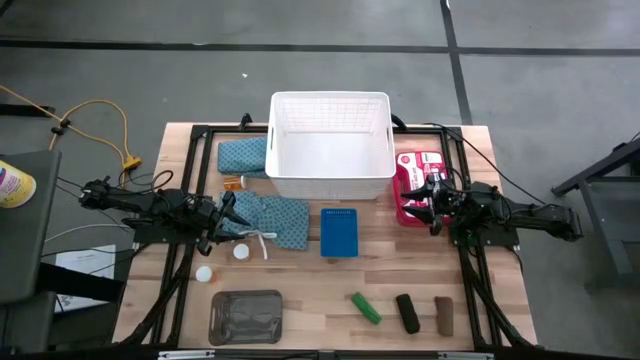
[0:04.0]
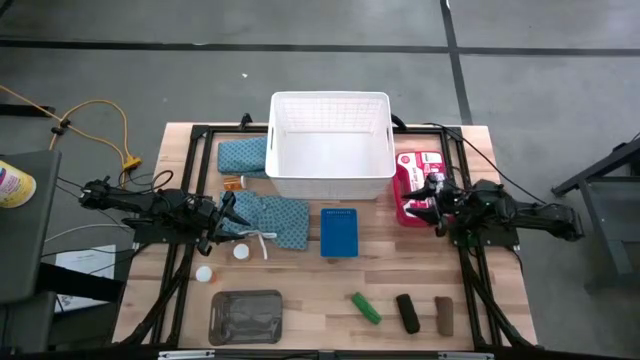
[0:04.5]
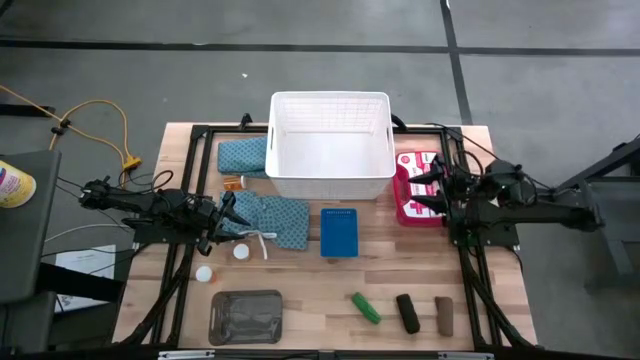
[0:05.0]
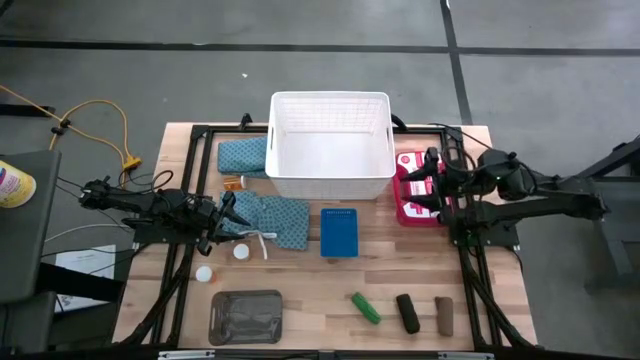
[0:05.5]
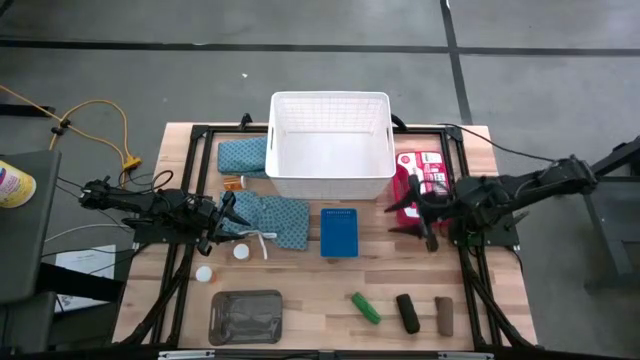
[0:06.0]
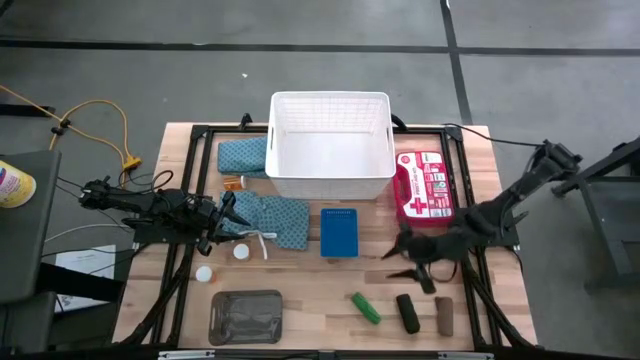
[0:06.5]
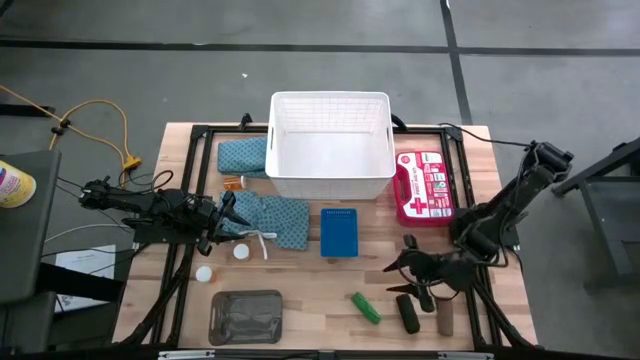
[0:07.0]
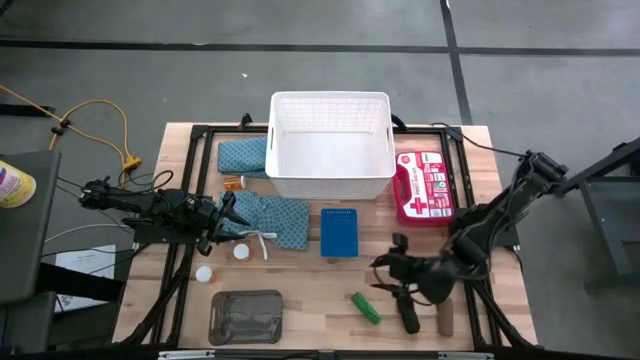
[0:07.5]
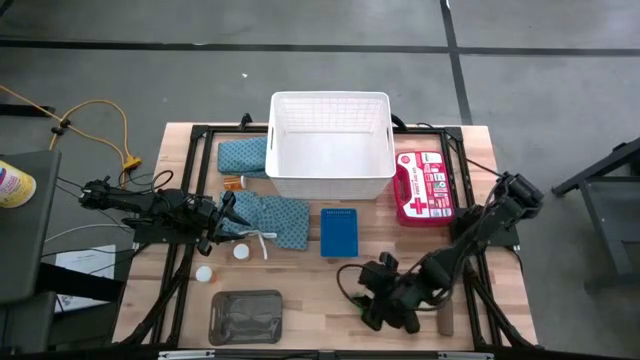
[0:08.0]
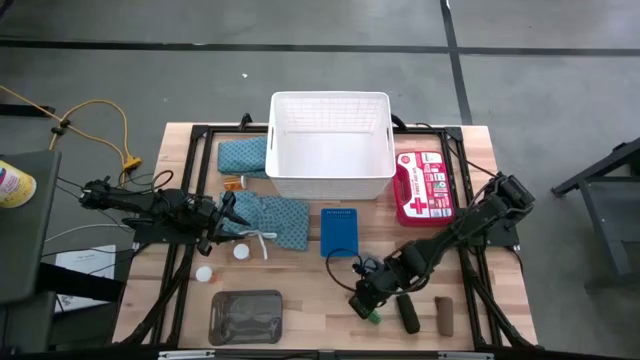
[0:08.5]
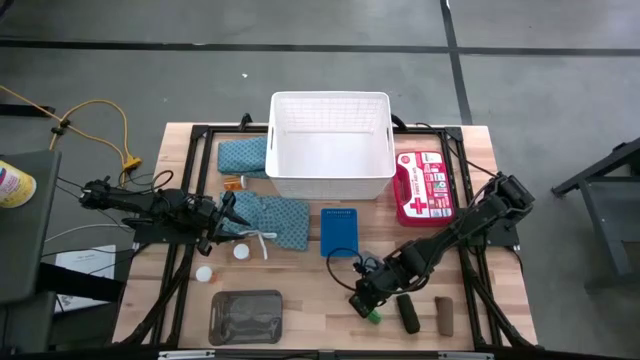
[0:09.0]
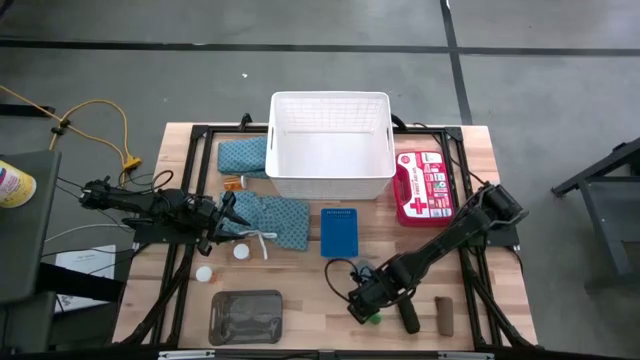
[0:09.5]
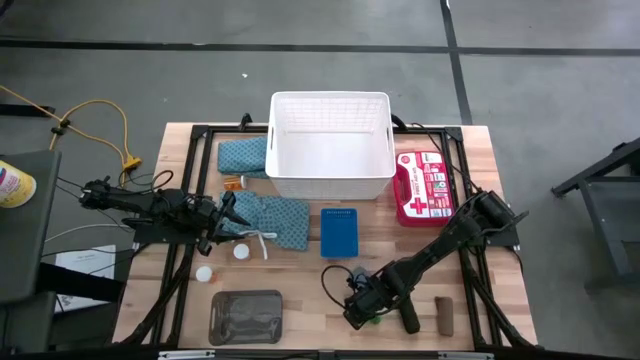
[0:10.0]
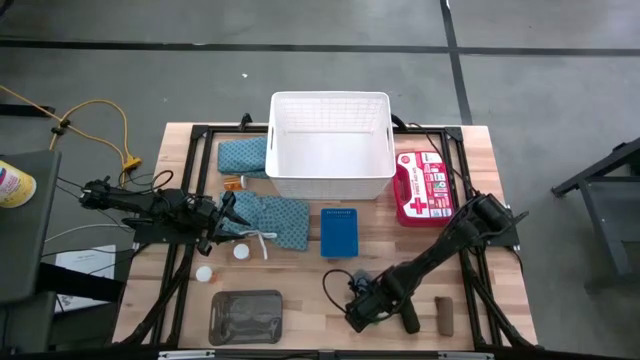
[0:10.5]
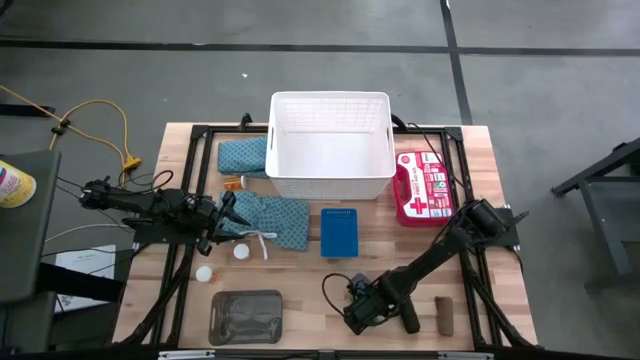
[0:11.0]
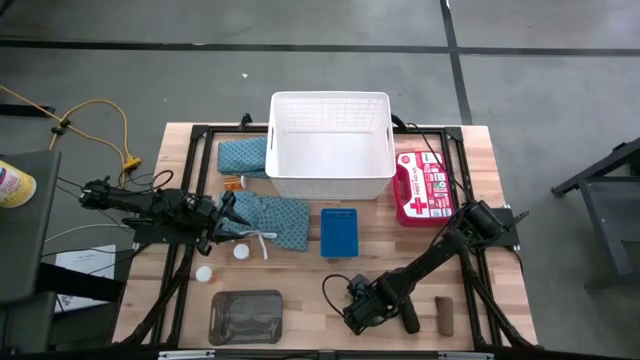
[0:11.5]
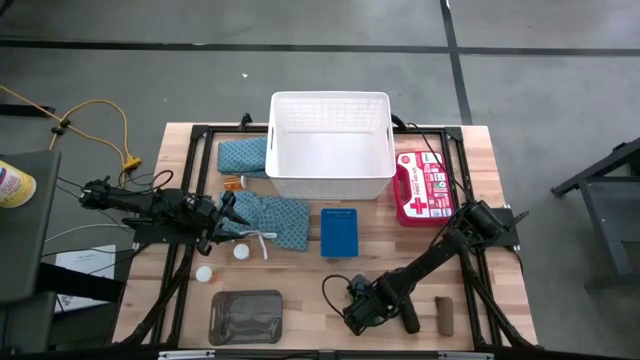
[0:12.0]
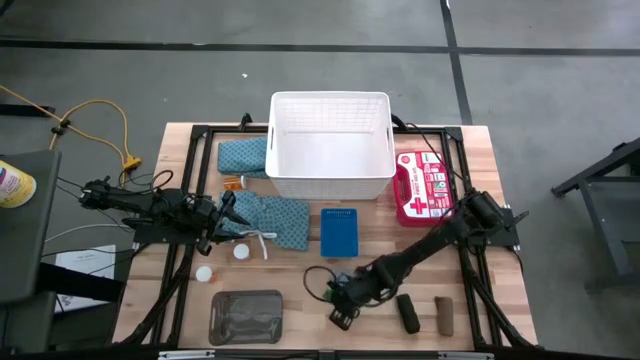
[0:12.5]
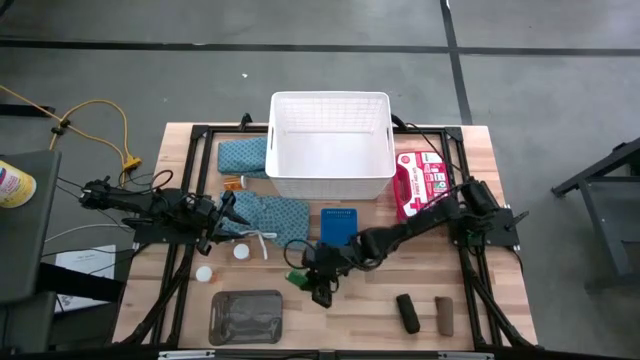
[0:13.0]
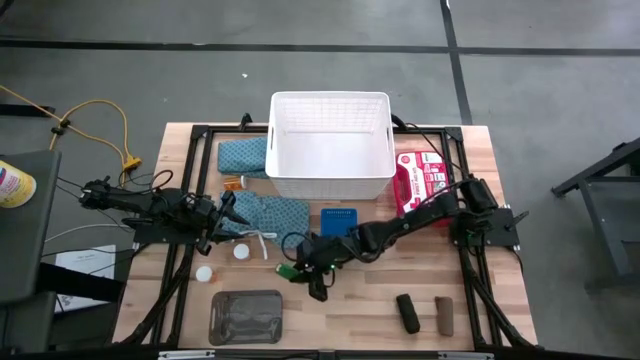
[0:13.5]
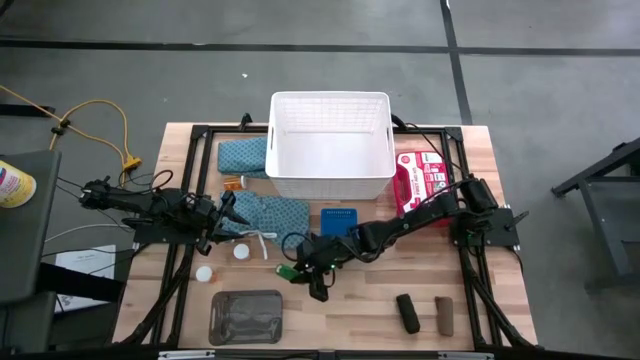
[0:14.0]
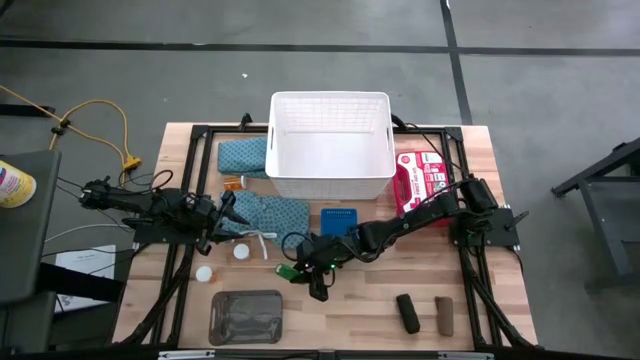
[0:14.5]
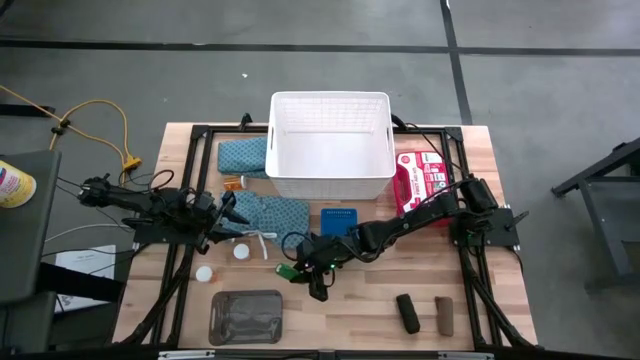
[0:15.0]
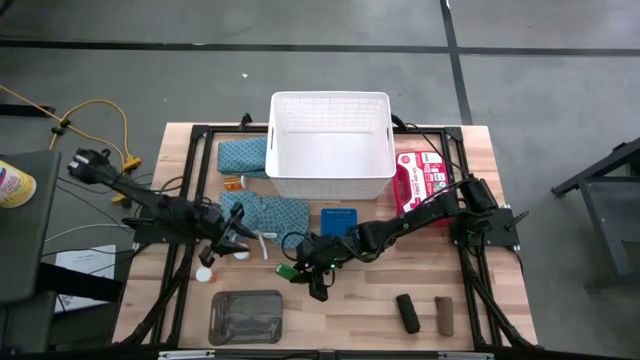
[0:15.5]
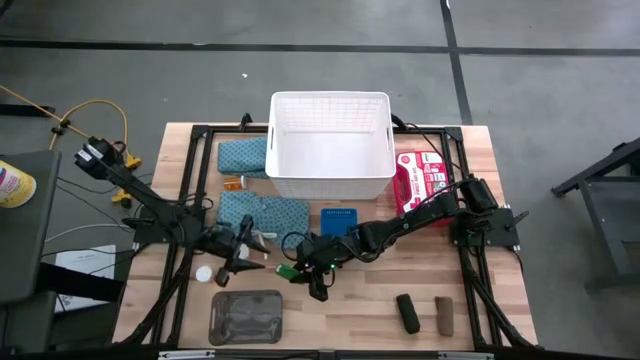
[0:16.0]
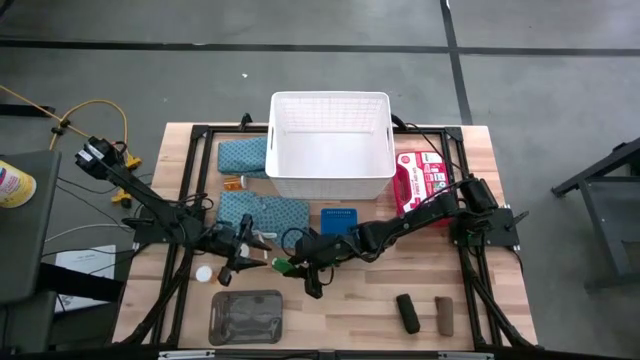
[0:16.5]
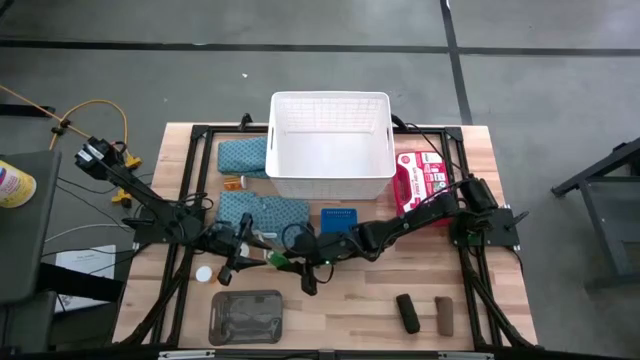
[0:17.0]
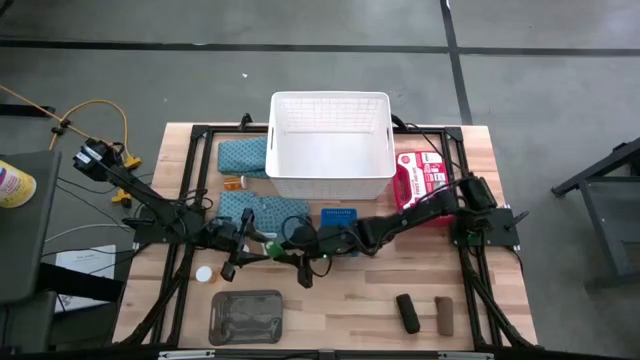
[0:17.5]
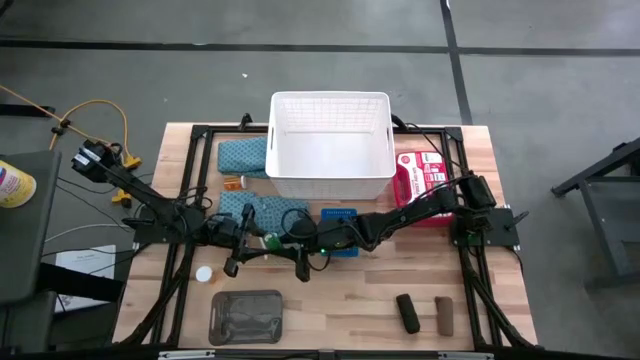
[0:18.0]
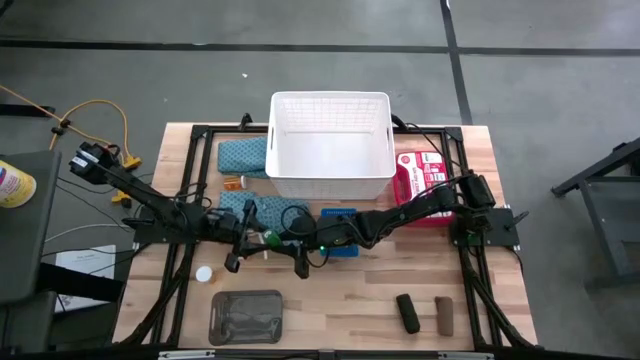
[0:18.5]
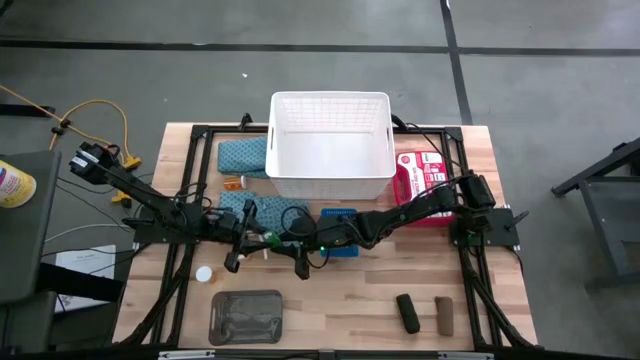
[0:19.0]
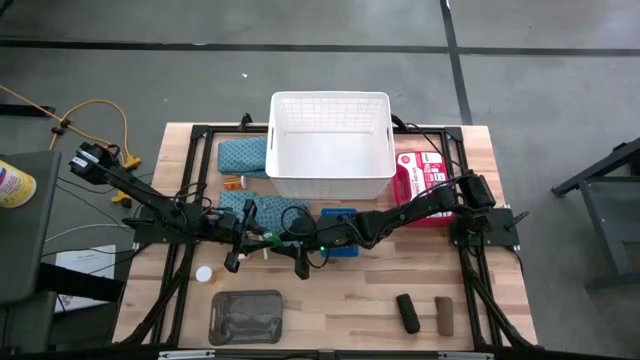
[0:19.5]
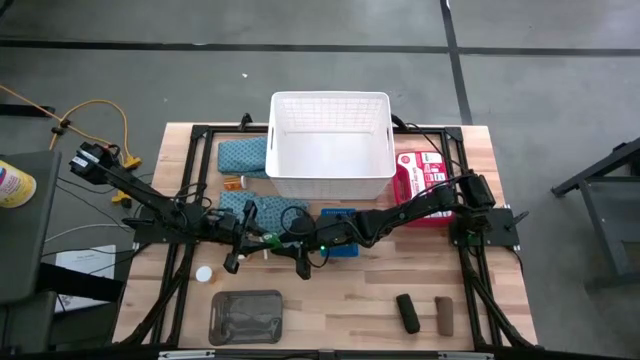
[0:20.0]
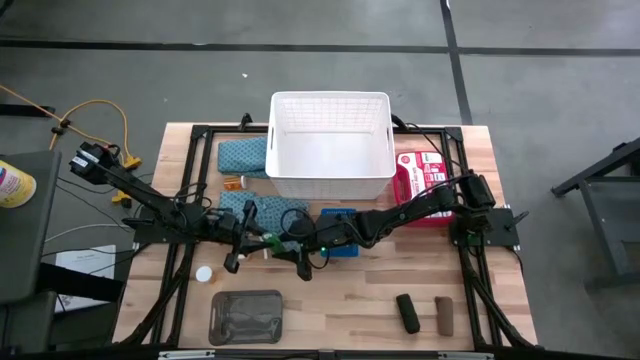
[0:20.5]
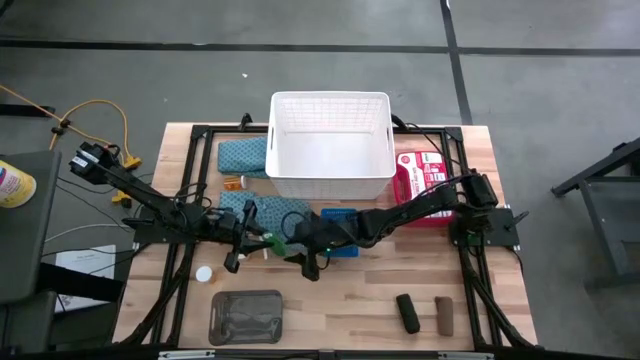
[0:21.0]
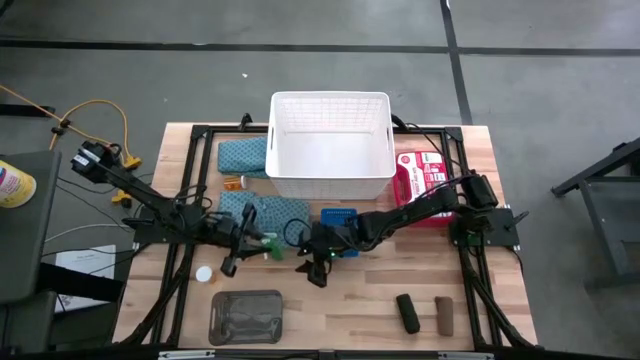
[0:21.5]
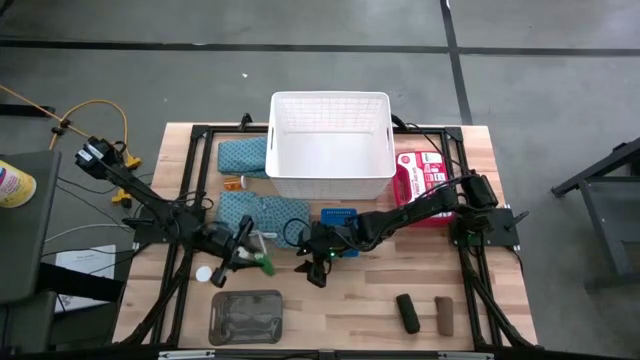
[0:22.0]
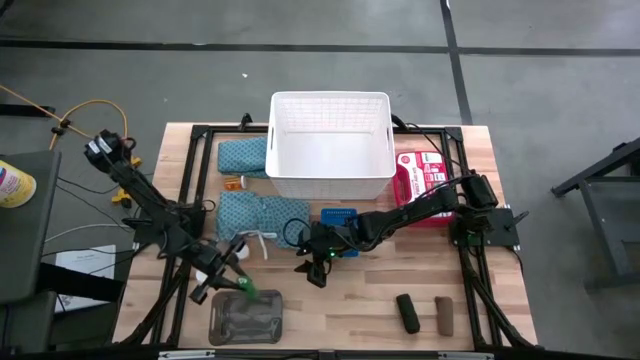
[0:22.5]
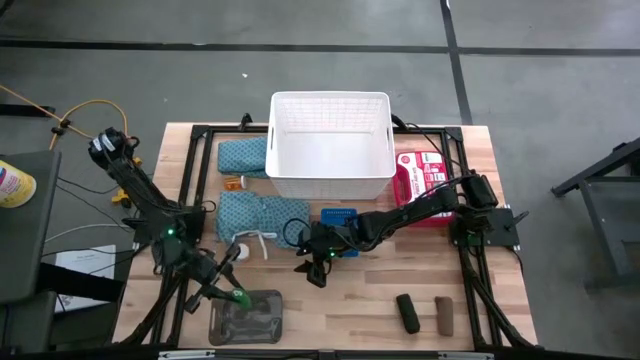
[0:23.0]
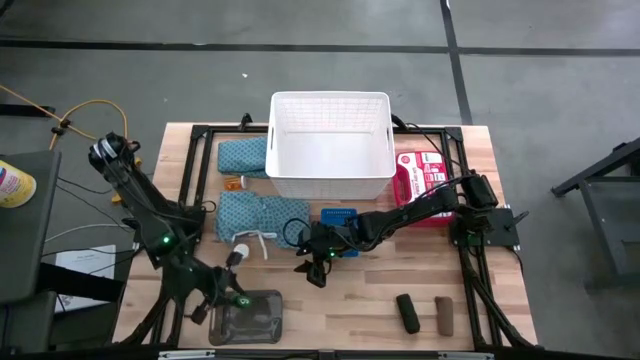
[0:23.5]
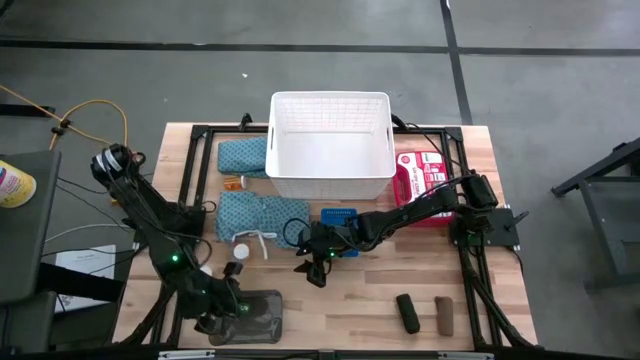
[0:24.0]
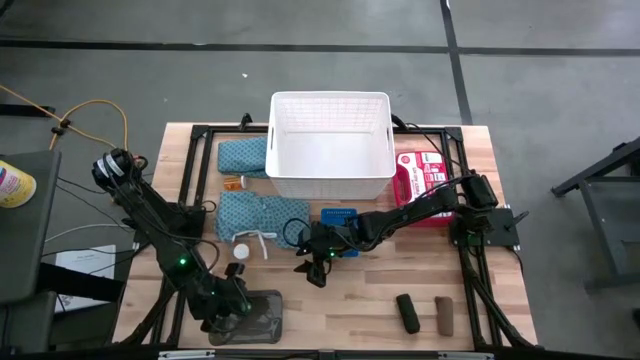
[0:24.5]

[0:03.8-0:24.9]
Task: Pick & place medical supplies in basket/bin
Put the green bandage into the transparent black bin
